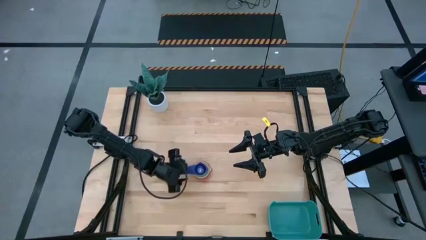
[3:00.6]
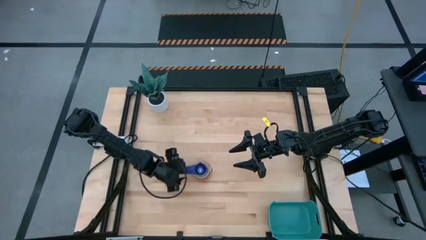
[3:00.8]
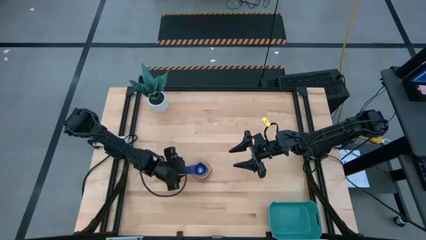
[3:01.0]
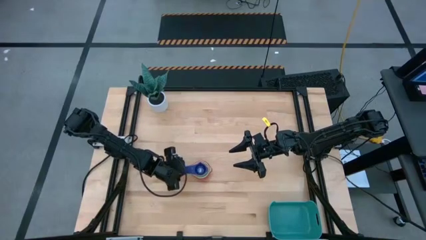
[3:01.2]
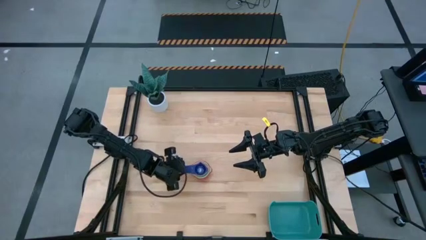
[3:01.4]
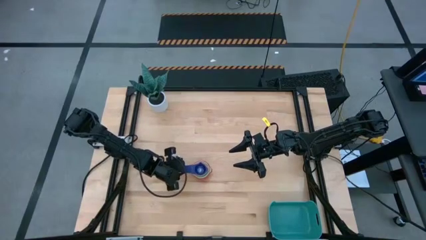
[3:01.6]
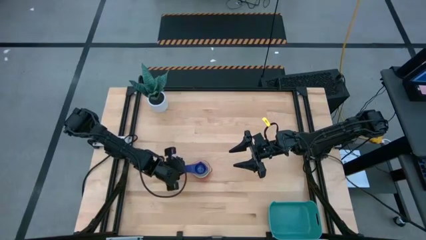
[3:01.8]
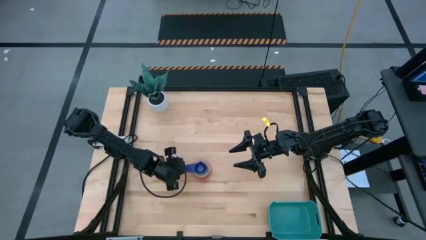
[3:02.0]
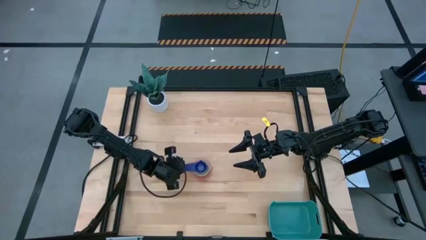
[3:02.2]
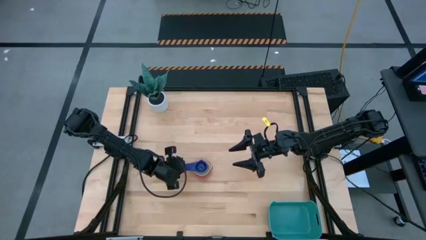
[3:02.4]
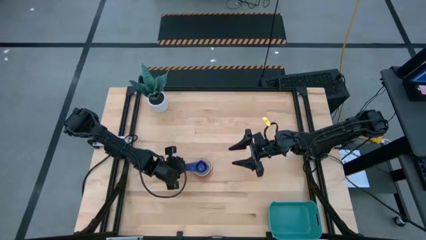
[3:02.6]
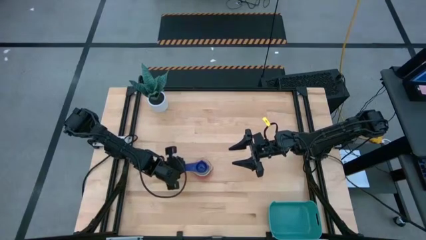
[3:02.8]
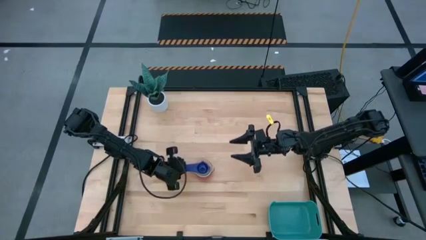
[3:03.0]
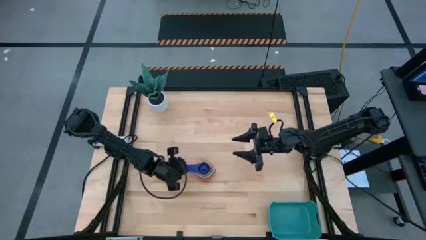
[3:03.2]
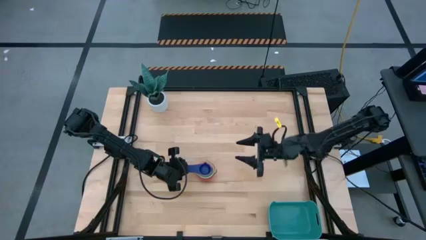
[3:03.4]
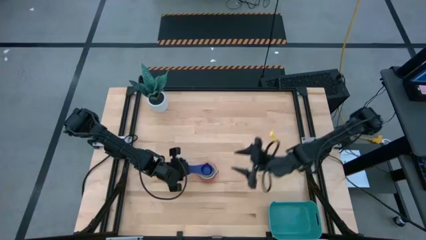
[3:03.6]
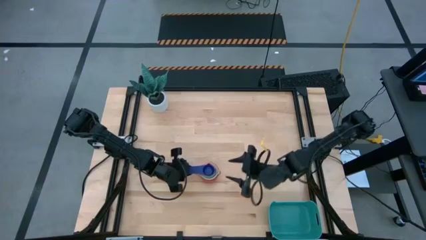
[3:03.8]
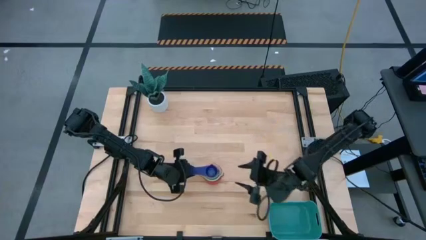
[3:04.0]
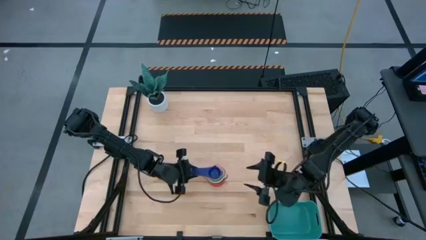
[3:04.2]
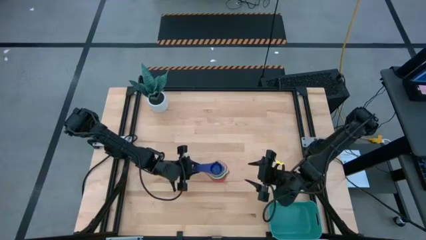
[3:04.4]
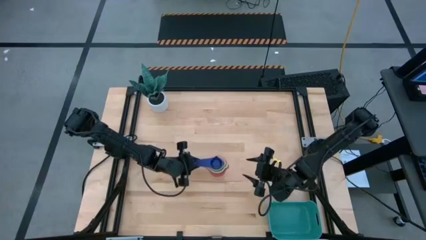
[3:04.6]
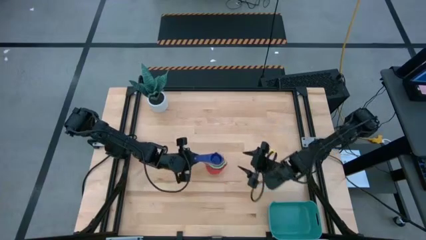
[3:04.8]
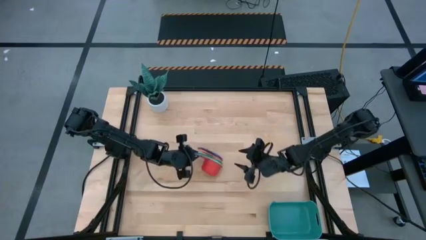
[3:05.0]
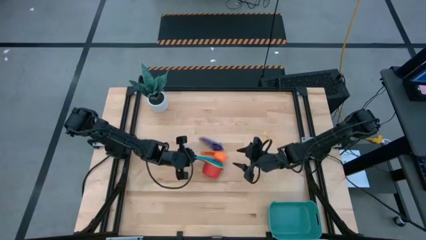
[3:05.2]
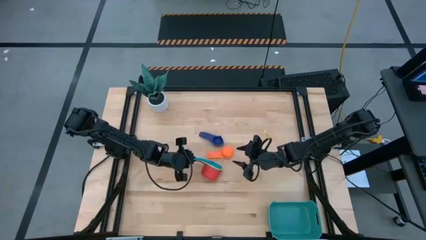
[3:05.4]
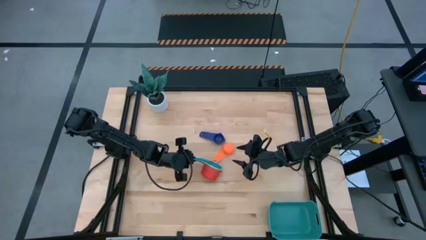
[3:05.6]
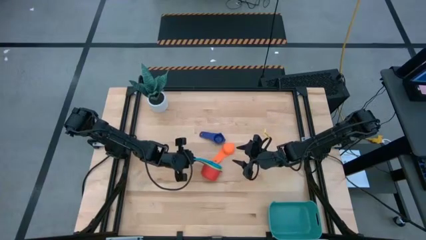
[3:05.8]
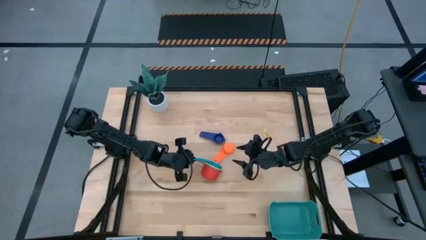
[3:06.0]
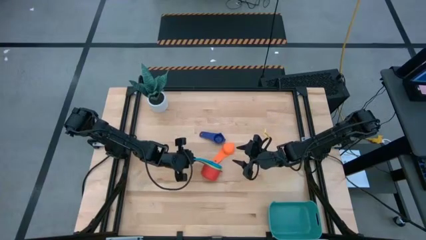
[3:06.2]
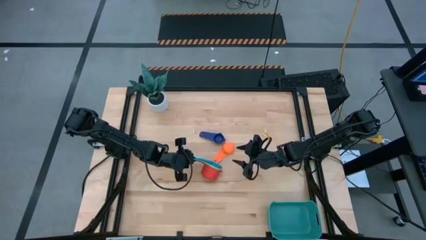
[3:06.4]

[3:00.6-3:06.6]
Task: Nest measuring cups in basket
Put the nested measuring cups into the green bin

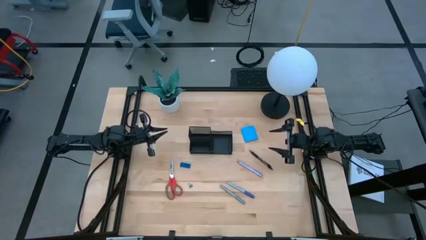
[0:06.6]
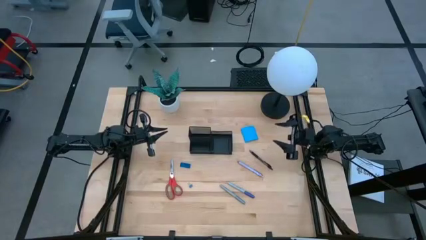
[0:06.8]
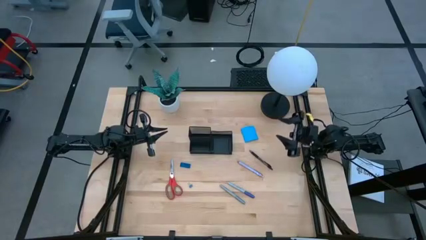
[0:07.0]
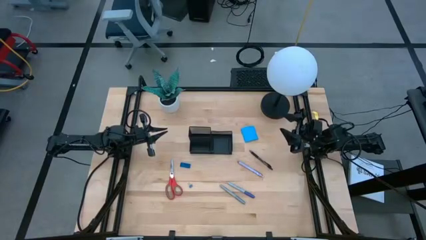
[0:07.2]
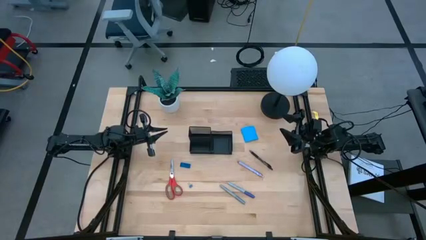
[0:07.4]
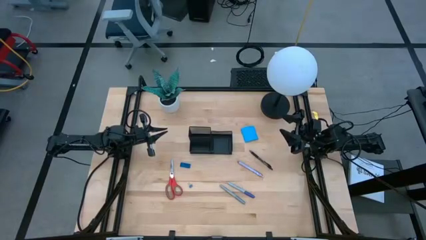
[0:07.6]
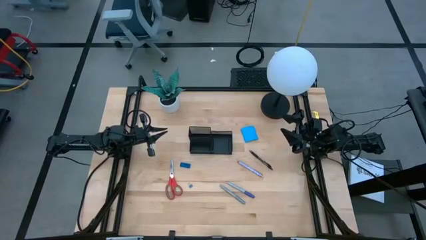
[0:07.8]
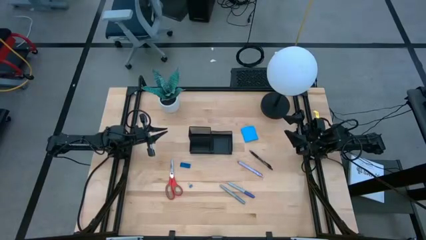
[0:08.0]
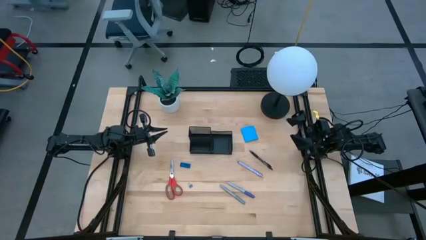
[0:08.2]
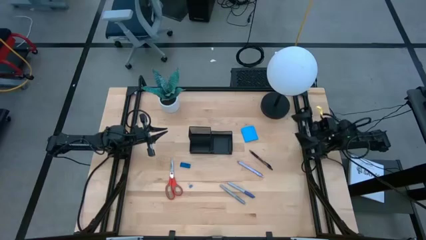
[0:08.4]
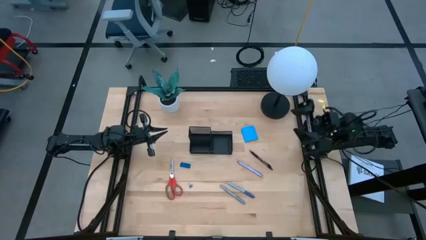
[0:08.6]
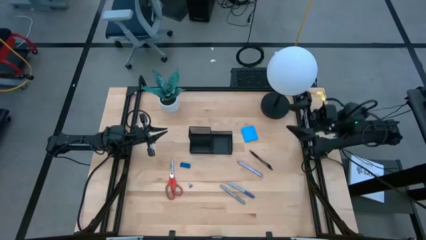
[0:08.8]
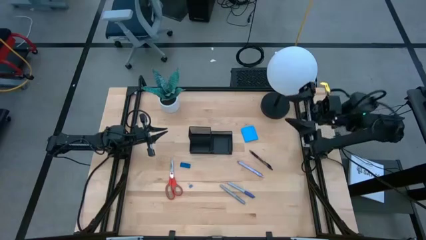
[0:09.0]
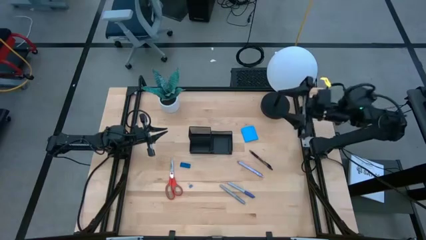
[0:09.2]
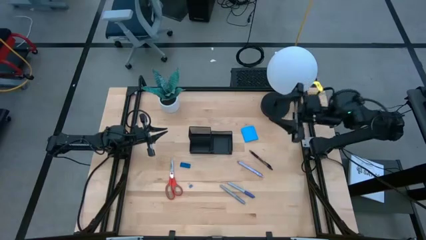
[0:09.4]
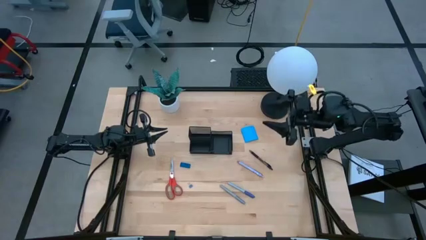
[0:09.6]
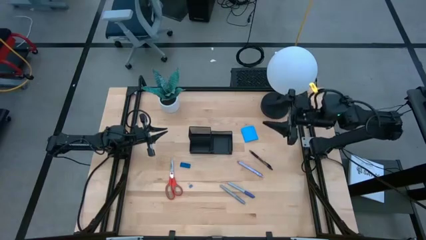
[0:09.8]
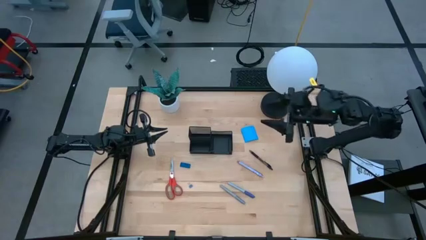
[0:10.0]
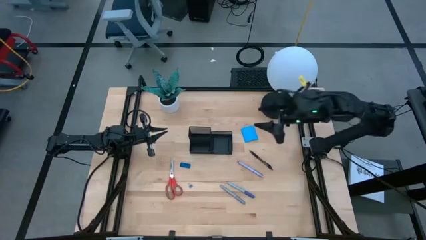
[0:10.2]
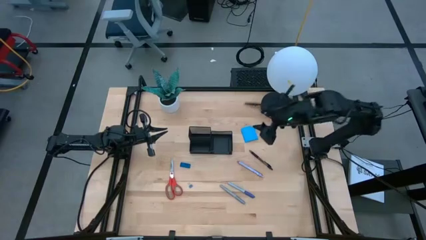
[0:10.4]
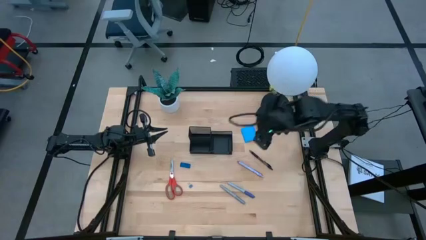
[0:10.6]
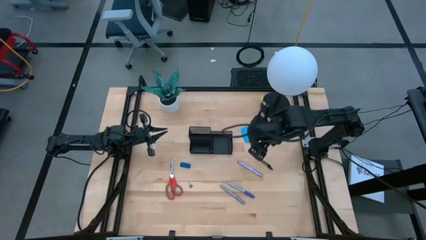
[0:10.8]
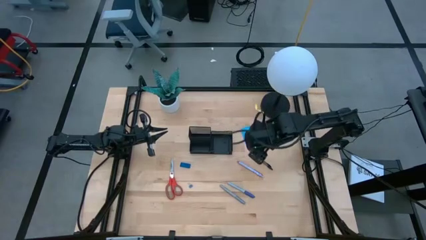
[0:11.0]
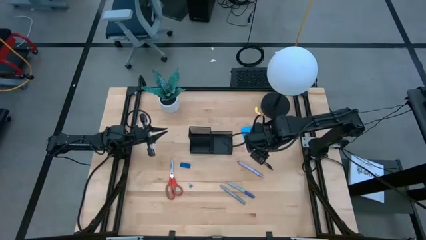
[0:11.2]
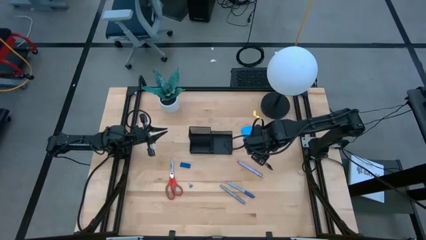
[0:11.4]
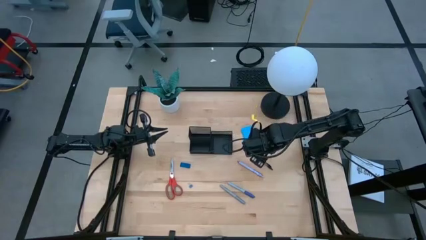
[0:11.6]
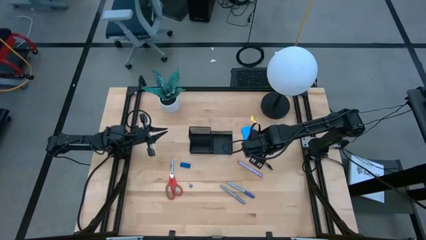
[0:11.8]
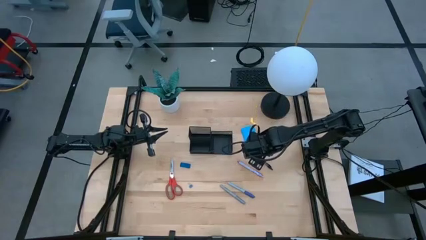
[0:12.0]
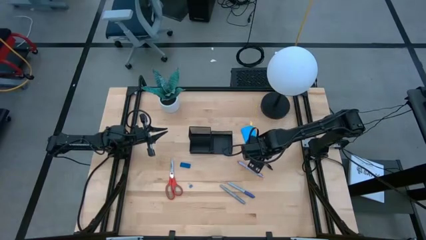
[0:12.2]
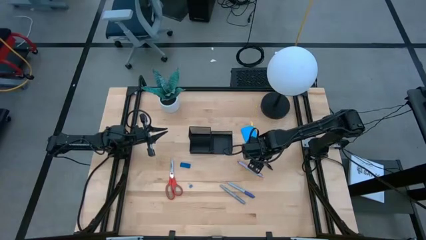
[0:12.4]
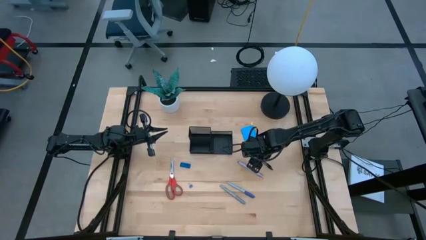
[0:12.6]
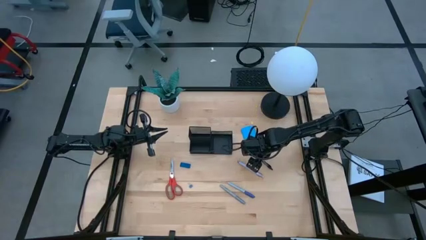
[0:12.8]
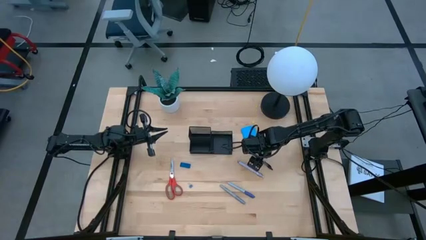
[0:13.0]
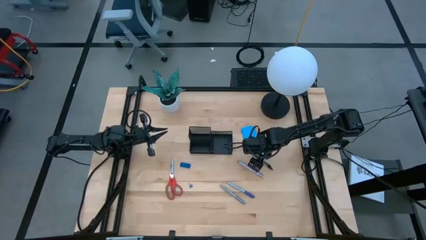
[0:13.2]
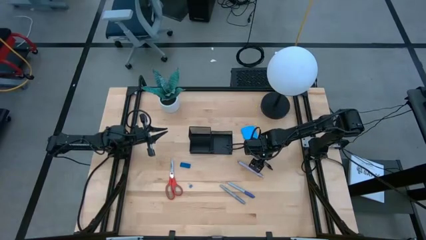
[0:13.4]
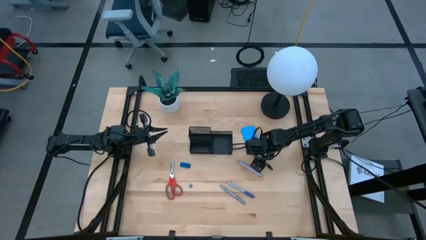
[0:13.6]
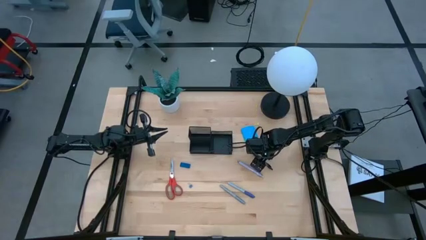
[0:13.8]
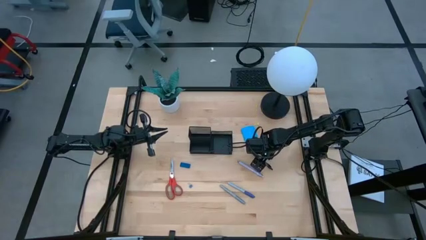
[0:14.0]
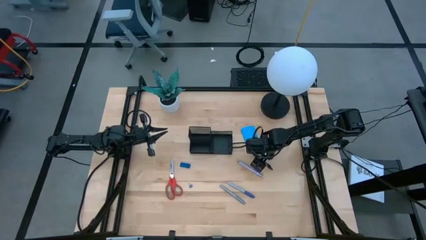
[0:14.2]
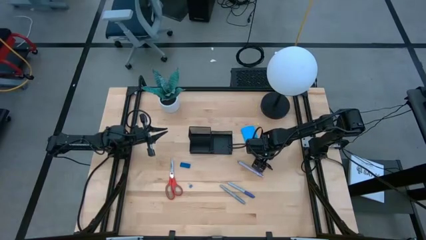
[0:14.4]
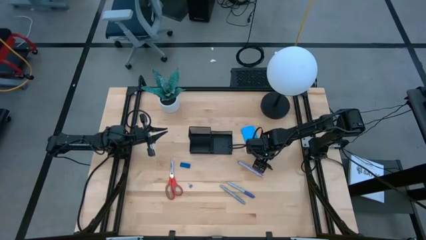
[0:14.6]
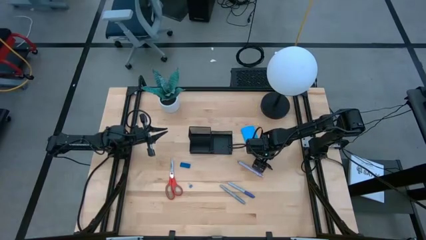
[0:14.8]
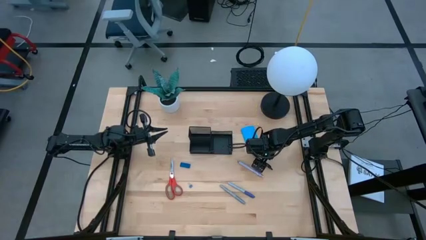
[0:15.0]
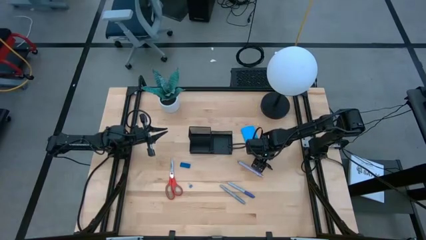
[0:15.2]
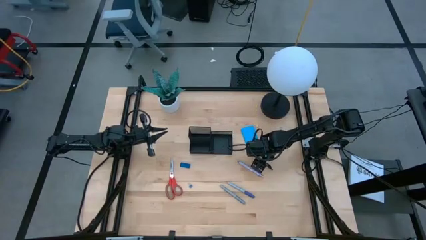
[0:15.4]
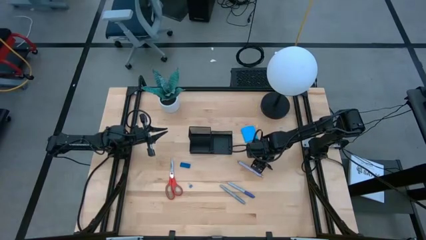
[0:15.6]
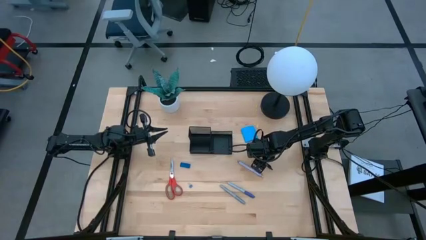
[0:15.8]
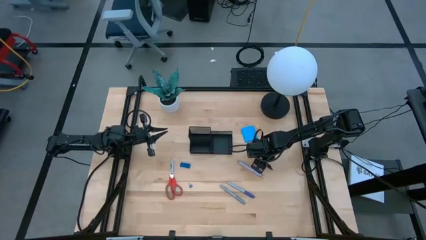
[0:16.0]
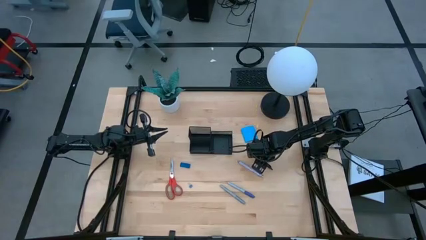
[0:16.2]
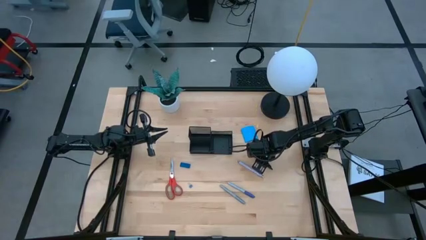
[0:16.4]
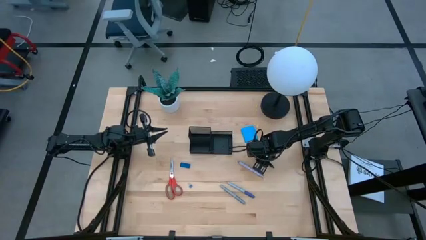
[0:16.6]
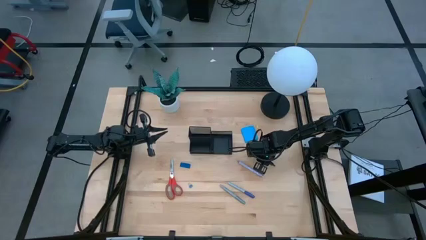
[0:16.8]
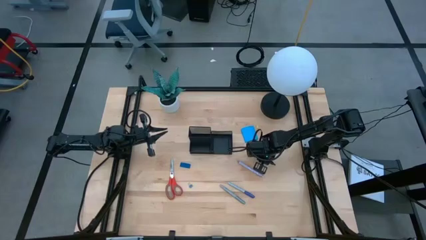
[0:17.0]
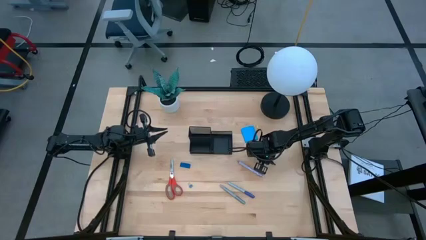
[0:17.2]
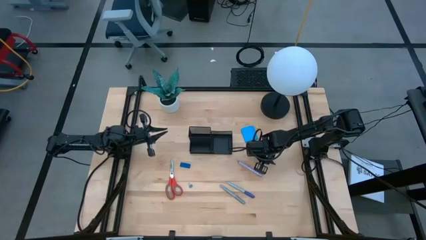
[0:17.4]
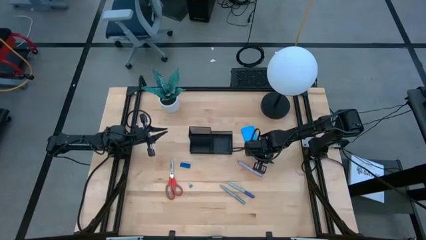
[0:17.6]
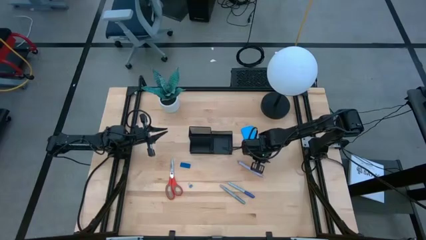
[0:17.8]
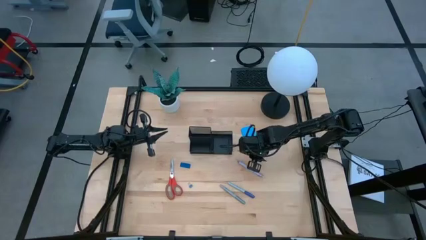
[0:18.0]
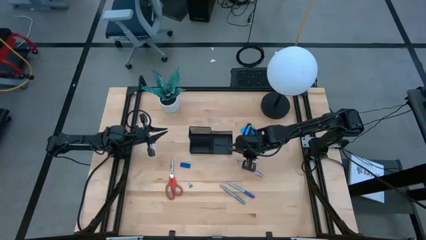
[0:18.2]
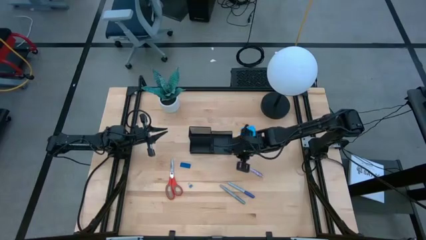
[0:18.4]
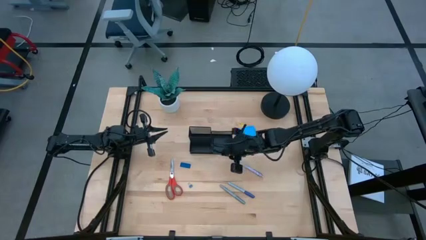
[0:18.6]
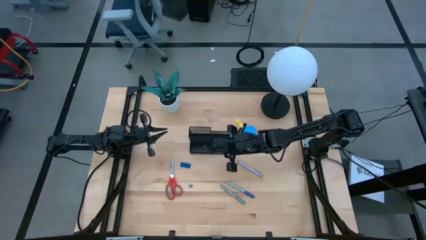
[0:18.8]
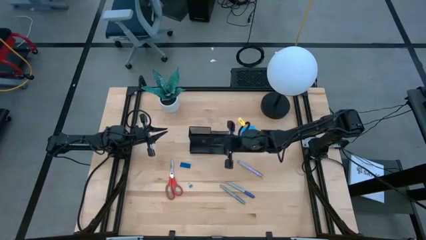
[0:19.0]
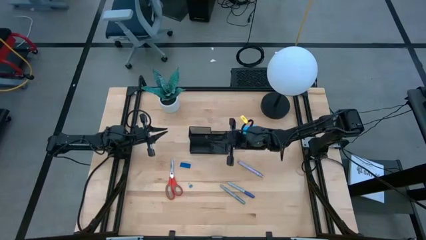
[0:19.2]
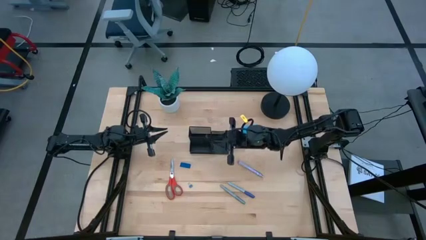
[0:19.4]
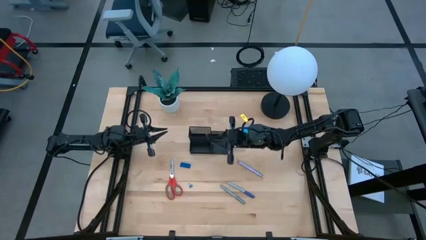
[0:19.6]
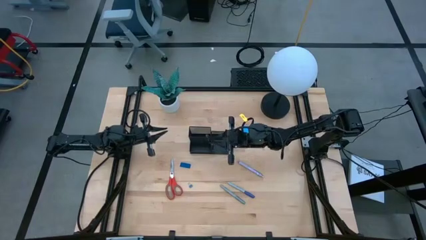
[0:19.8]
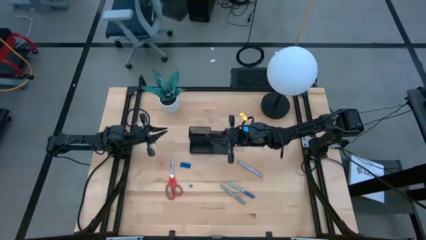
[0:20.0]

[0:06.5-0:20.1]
Task: Pick and place office supplies into organizer
Put the black pen into the black desk organizer
